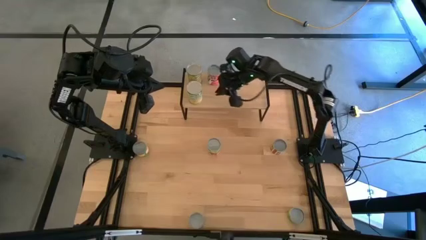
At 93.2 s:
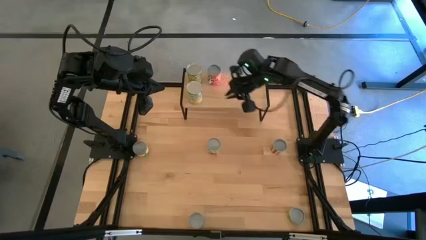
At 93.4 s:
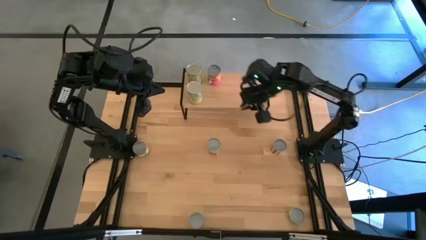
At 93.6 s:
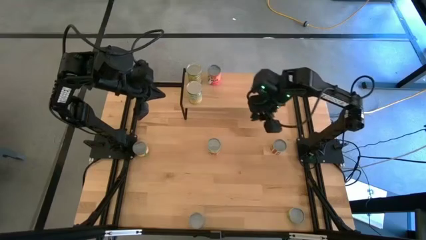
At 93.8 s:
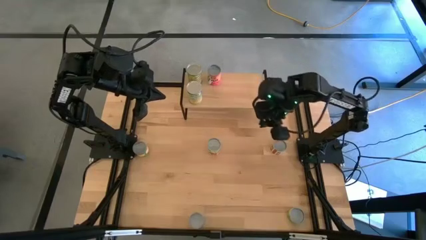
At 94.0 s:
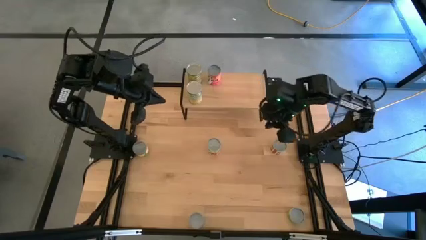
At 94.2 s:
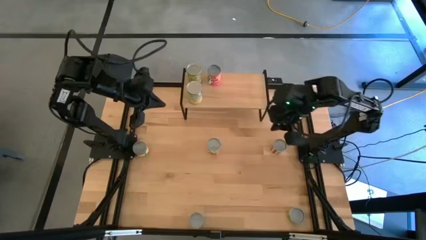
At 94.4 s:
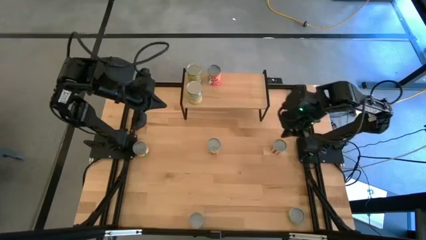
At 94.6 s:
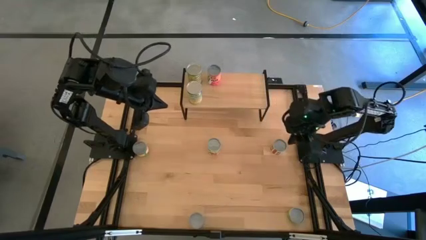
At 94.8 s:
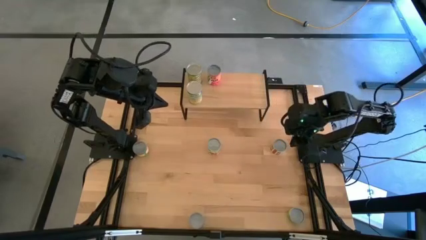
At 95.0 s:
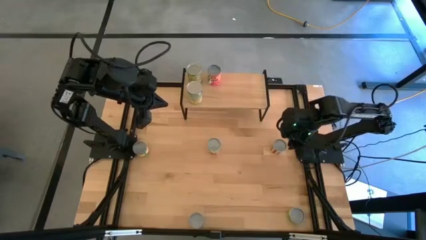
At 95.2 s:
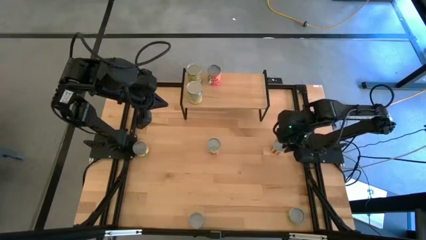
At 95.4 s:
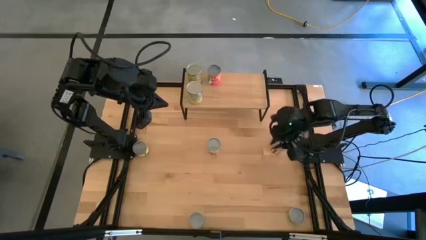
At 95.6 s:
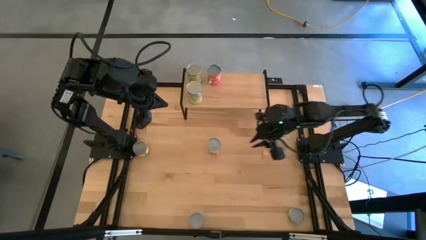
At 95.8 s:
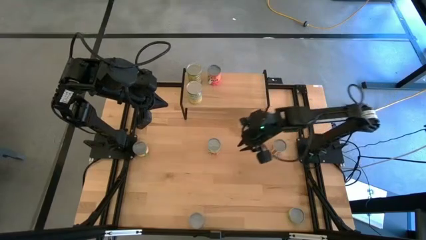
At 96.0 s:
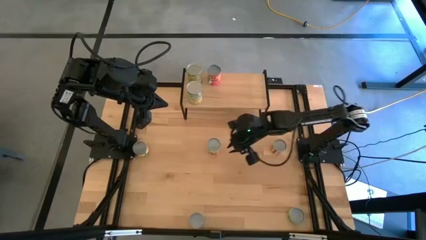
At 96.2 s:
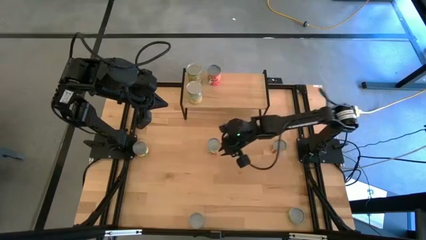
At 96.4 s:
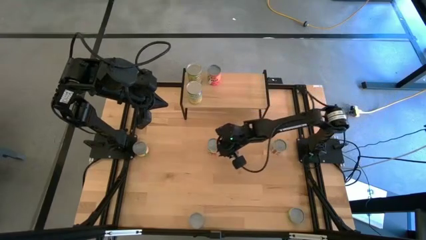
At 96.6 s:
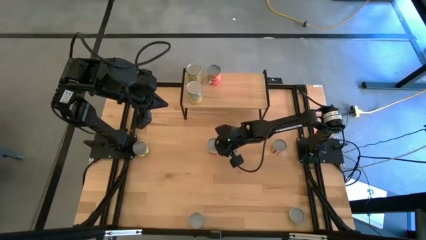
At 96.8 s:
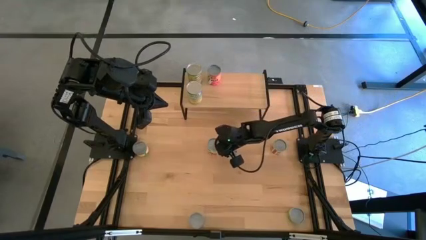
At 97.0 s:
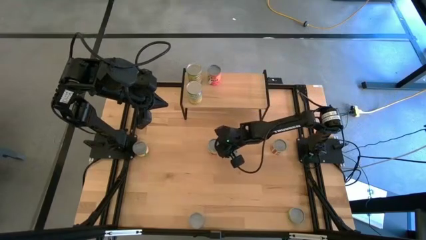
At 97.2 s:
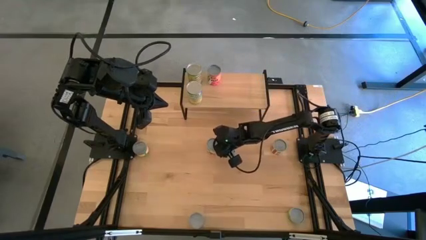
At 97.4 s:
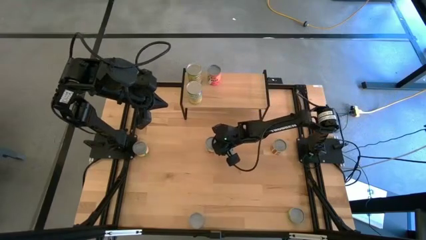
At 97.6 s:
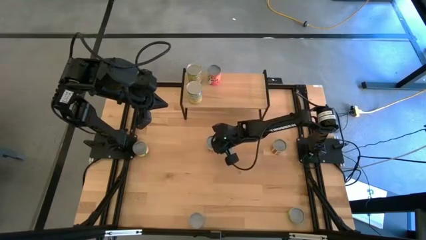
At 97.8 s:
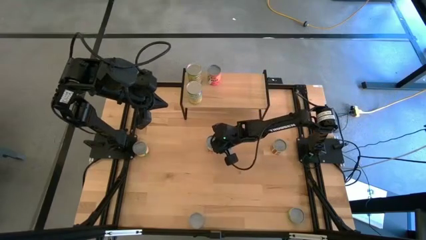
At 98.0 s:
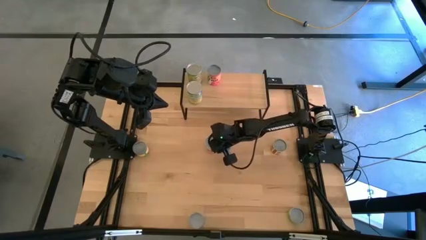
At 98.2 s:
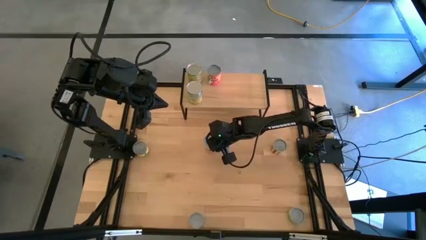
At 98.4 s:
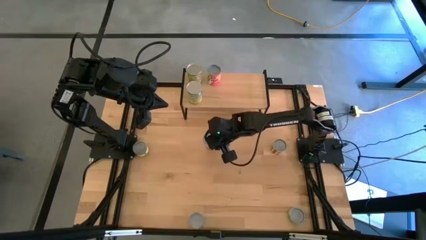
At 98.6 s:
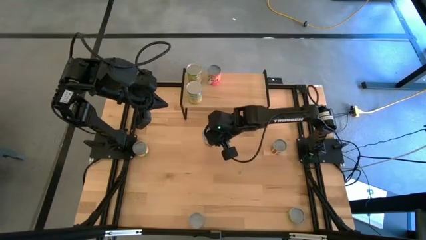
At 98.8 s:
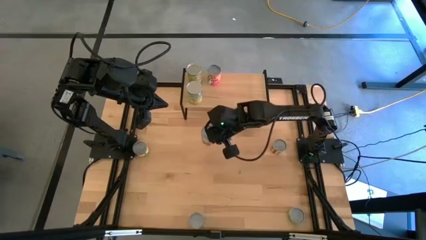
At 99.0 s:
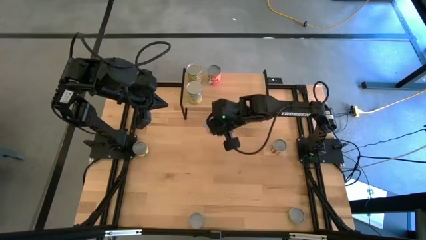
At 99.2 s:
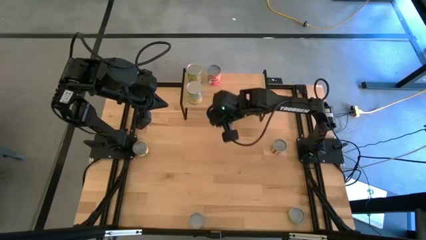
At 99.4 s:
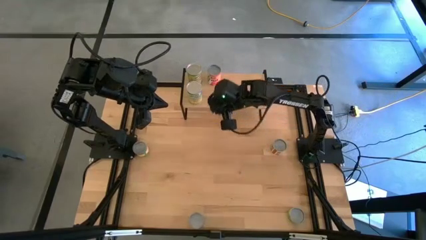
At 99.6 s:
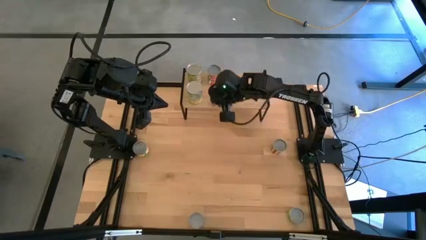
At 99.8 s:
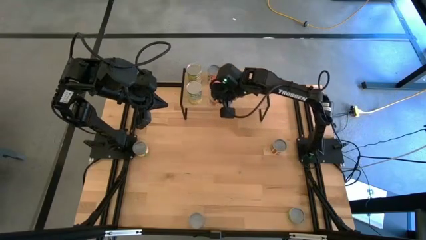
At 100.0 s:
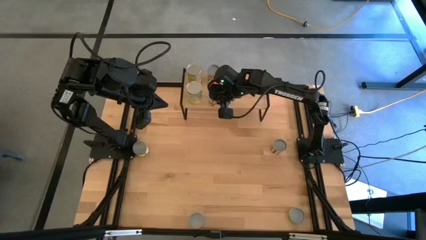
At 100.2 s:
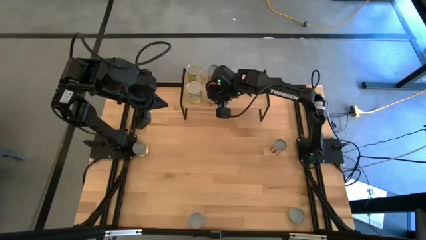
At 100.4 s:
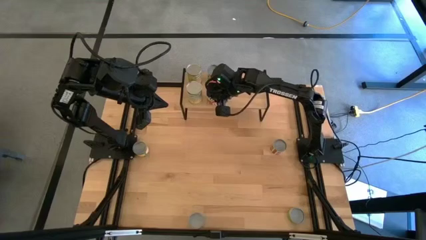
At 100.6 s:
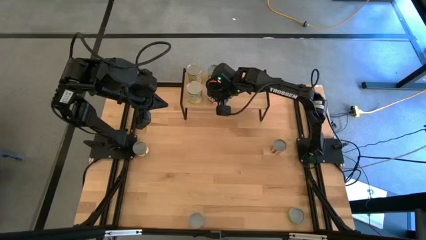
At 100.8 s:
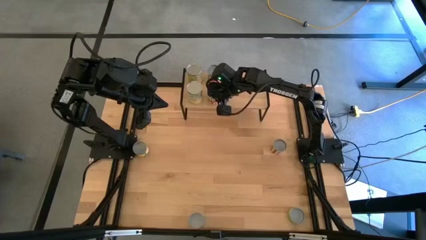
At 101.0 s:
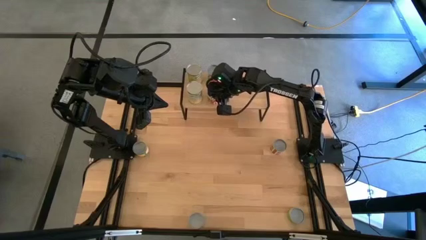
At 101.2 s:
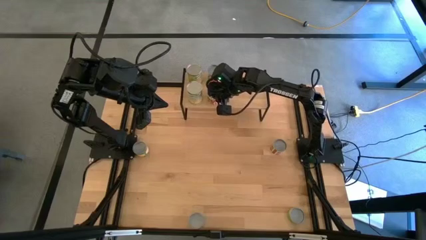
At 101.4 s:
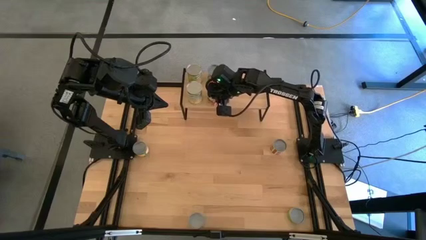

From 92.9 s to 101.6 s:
Task: Pick and place cans onto a shelf
Put the canned spaghetti sauce on the shelf

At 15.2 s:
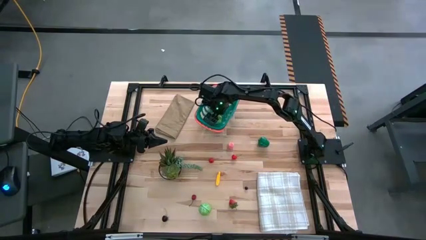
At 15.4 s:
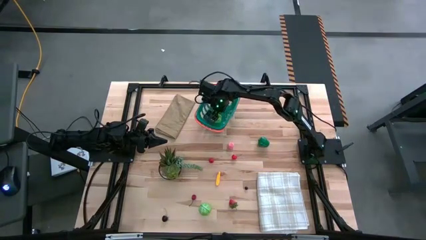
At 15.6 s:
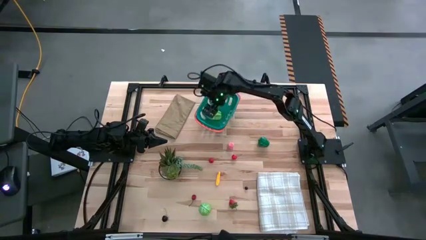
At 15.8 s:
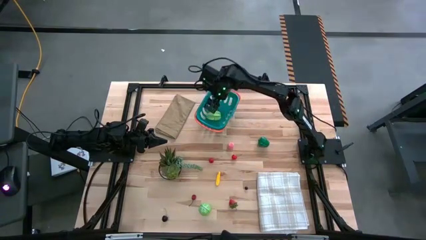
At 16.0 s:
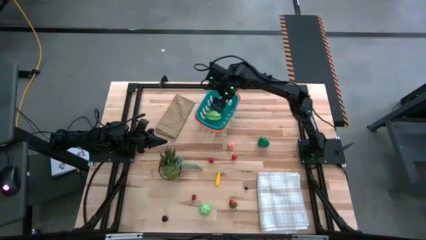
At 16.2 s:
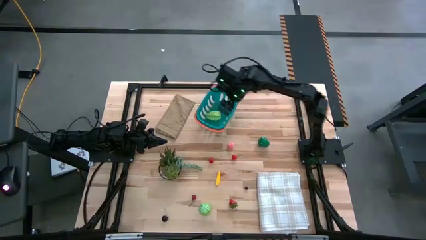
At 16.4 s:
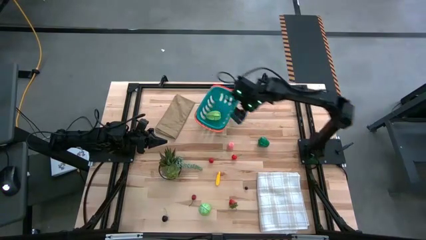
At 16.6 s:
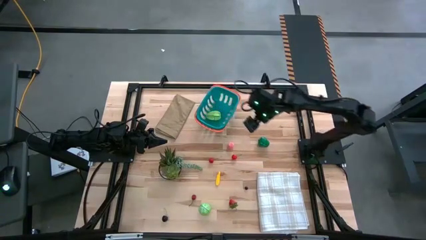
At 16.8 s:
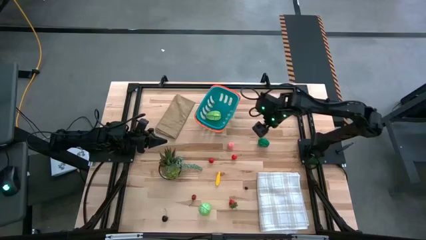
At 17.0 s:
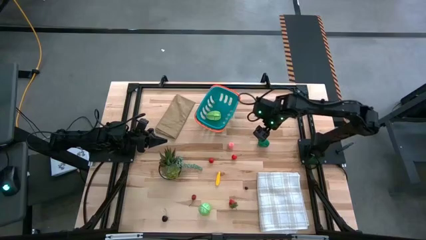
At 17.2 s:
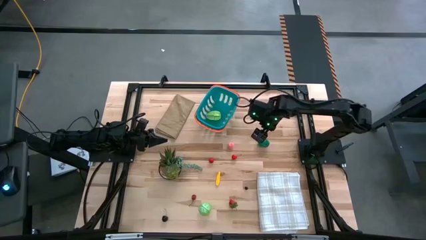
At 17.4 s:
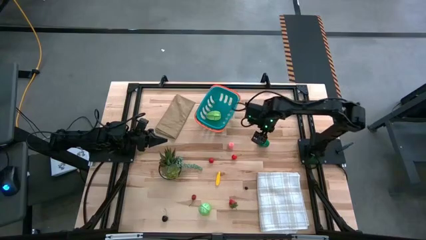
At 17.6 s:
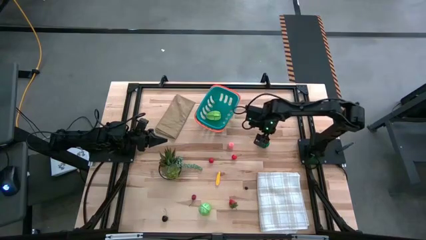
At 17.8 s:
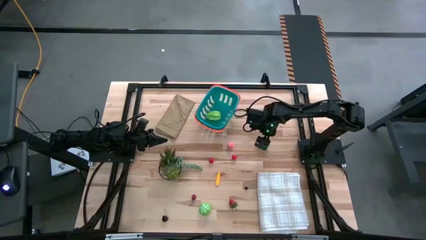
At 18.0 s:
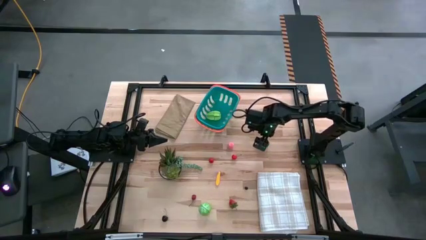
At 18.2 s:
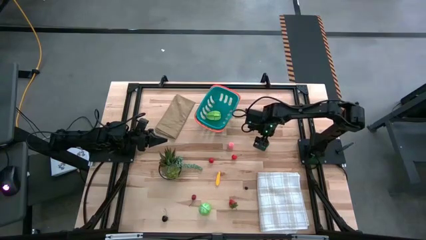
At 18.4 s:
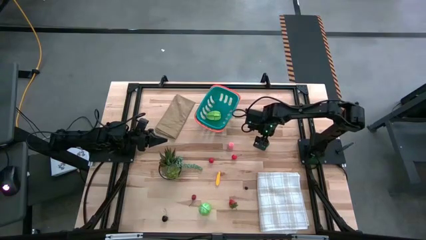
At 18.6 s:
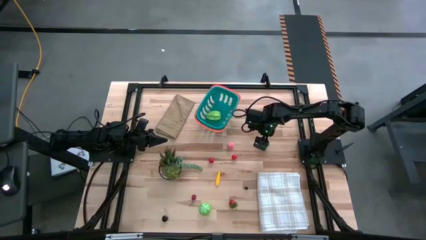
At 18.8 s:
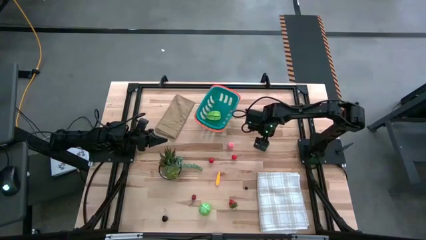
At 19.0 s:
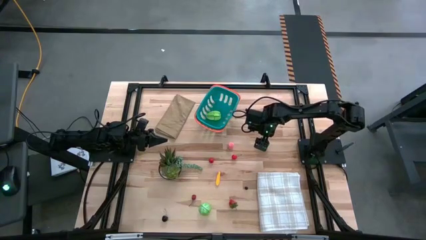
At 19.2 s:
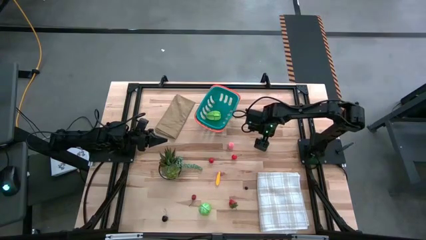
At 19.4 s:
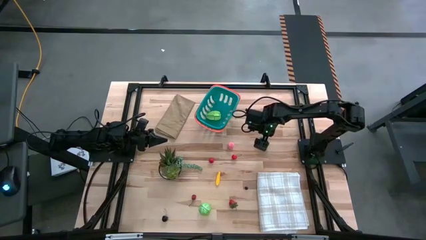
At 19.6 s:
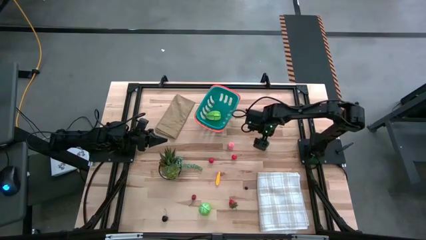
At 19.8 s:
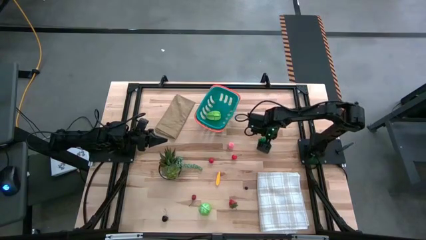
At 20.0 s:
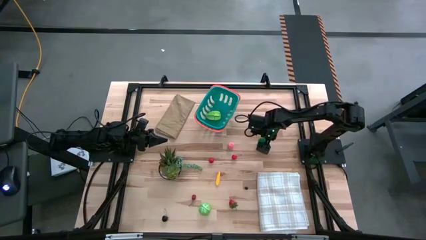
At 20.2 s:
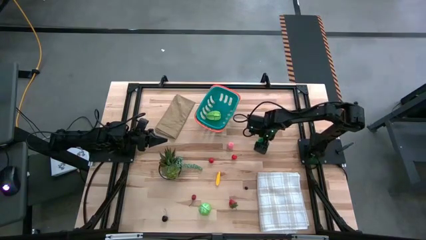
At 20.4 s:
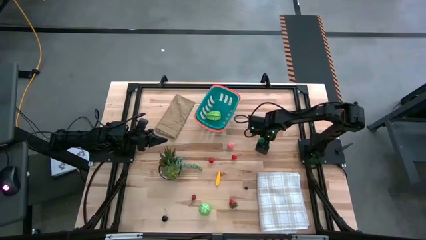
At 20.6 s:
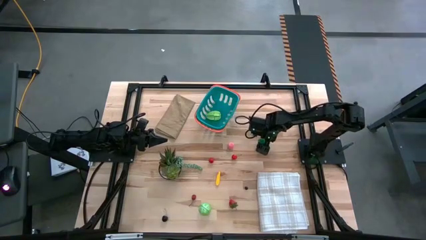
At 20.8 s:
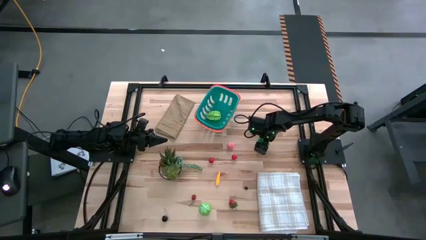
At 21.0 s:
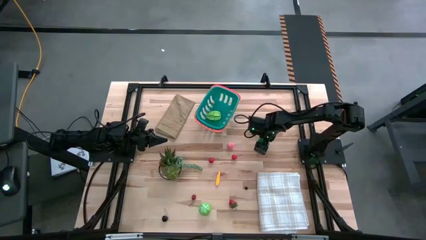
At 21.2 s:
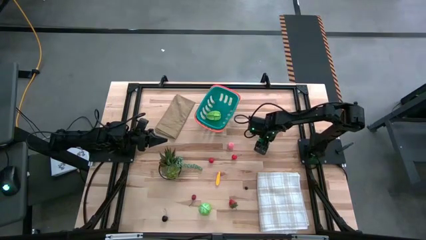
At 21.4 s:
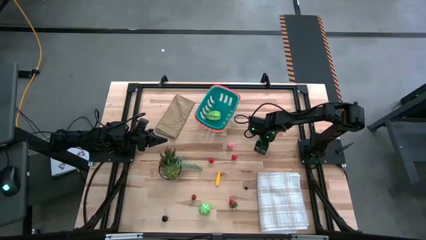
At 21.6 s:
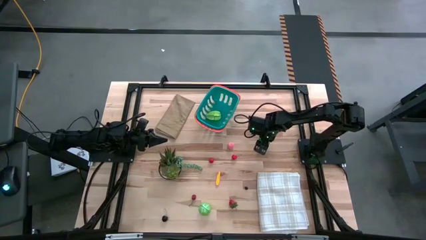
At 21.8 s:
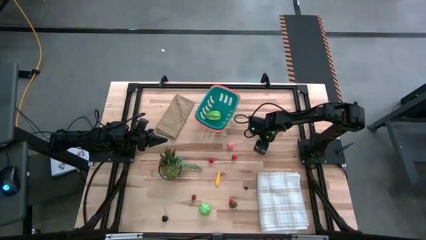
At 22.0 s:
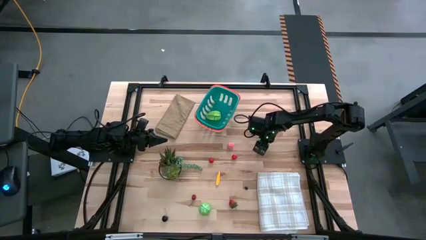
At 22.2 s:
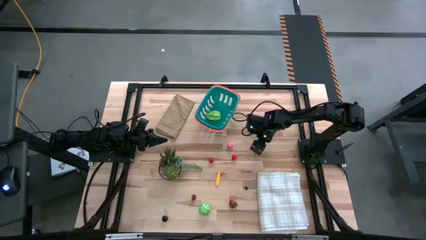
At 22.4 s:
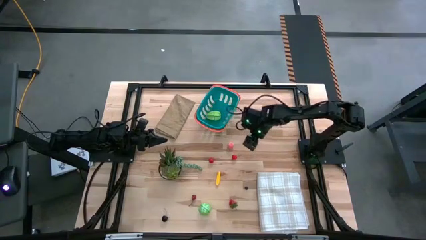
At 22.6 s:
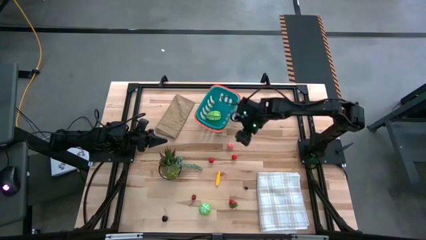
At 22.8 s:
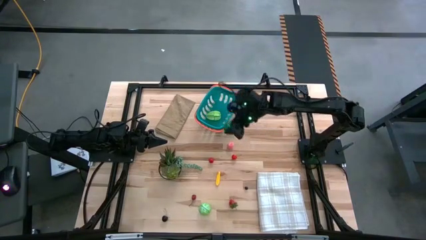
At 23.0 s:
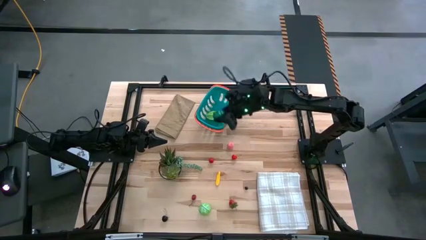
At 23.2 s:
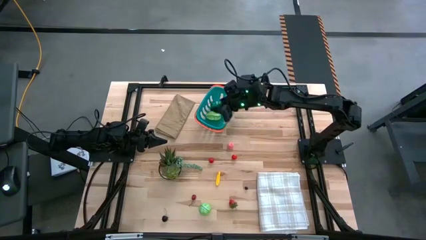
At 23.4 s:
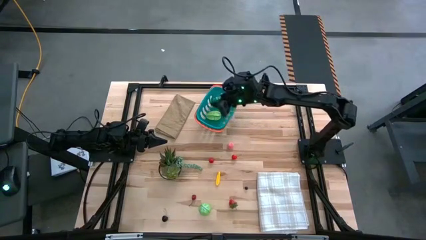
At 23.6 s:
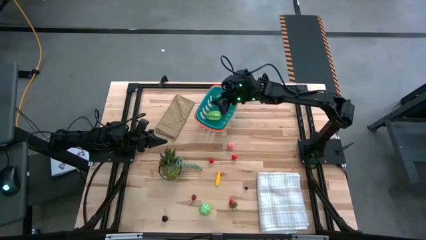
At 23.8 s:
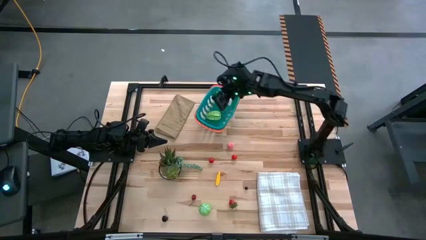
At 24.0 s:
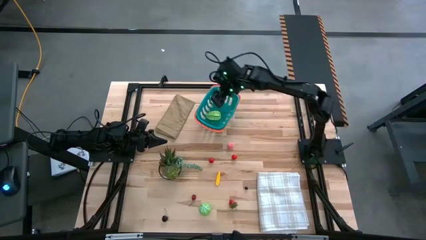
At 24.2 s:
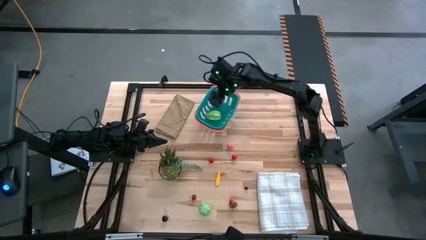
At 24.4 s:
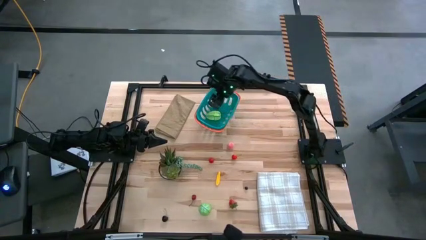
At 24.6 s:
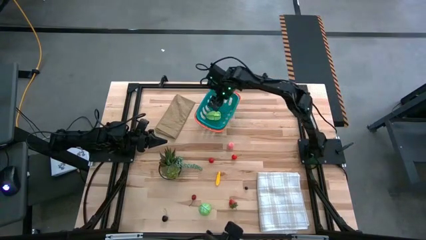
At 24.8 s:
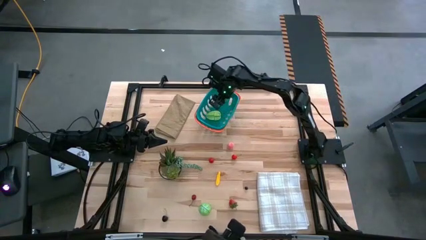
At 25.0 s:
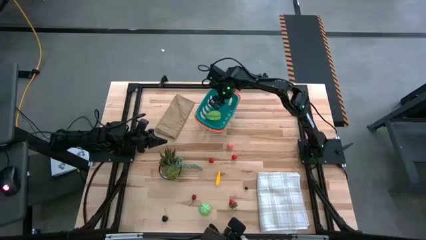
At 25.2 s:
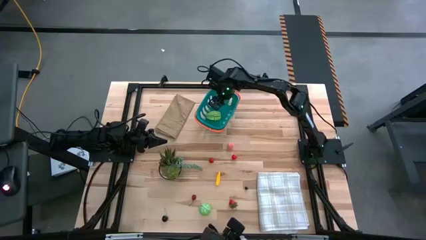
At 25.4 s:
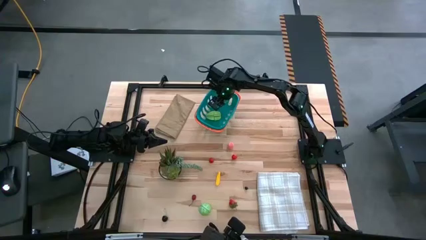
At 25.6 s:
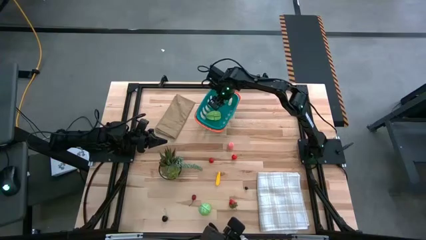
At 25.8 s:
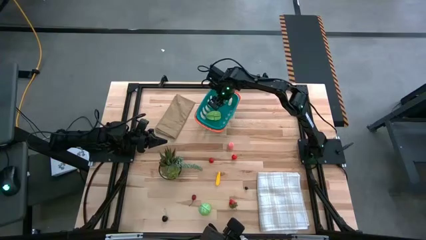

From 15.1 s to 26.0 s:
Task: Pick and placing Produce into tupperware
Put the green bell pepper in the green basket
